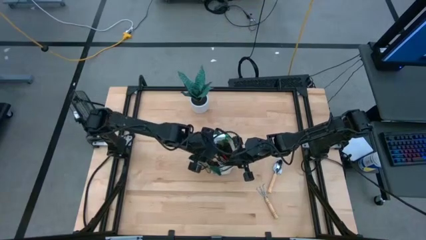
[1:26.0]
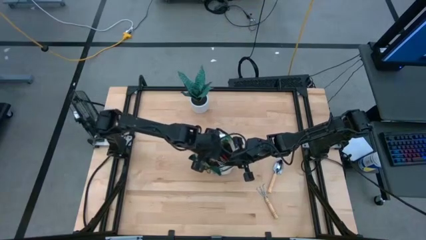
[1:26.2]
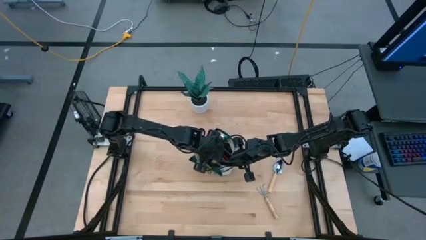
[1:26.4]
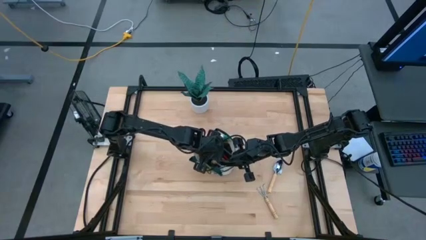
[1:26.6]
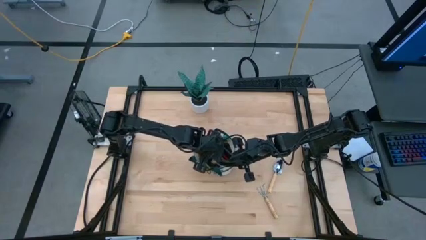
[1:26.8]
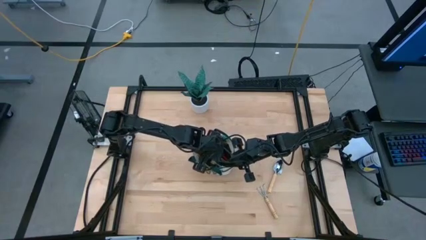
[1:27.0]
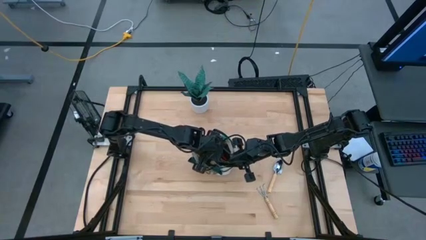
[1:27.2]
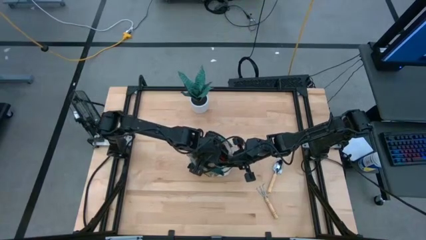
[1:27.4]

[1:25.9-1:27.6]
Task: Pick & Place Garden tools in Gardening bag
Adjust the brown trowel in the gardening bag

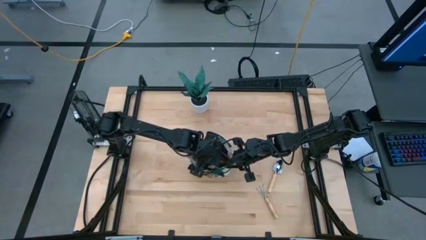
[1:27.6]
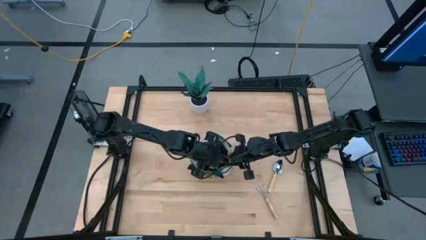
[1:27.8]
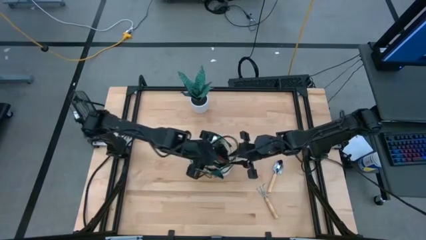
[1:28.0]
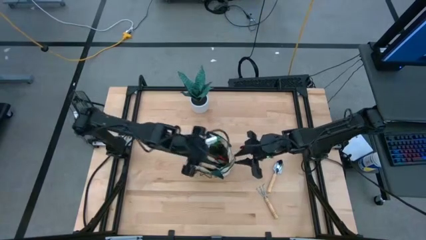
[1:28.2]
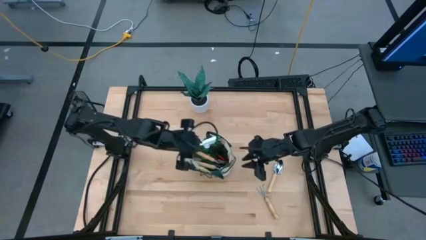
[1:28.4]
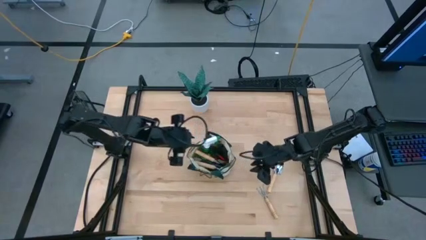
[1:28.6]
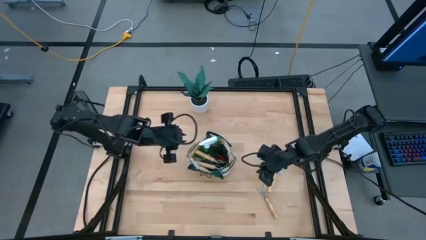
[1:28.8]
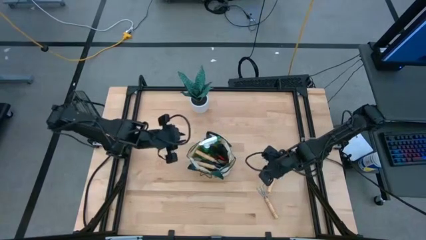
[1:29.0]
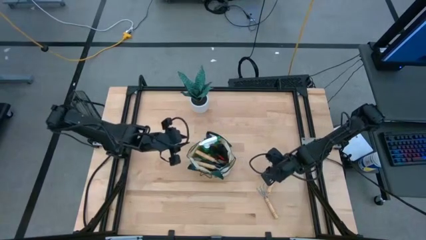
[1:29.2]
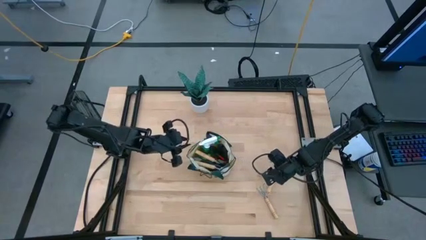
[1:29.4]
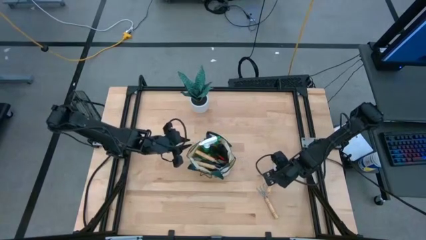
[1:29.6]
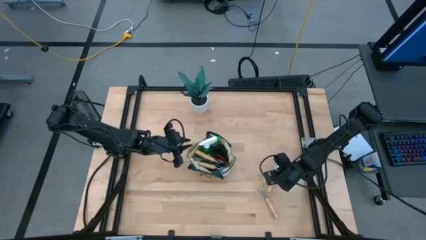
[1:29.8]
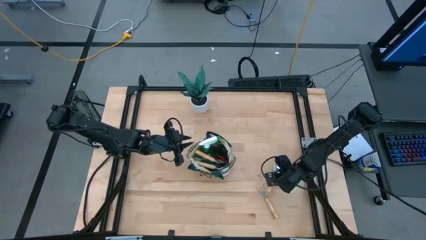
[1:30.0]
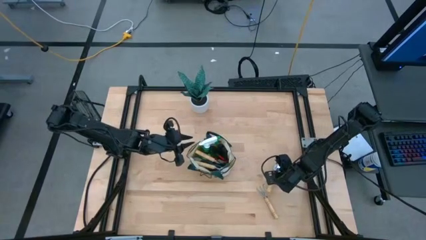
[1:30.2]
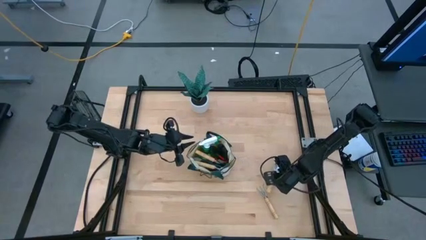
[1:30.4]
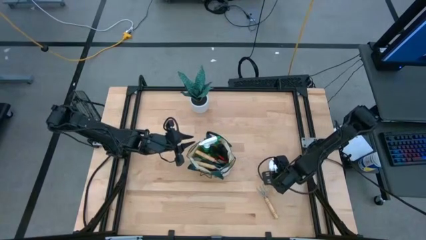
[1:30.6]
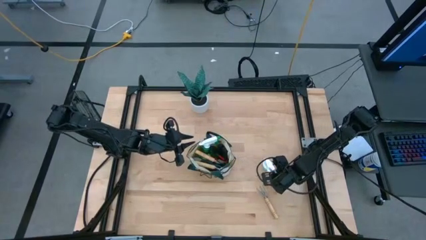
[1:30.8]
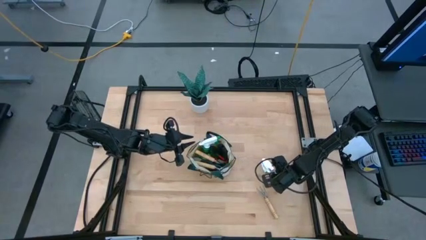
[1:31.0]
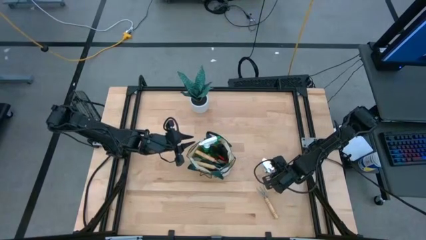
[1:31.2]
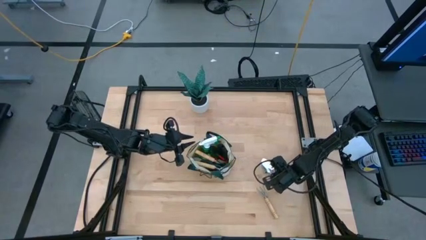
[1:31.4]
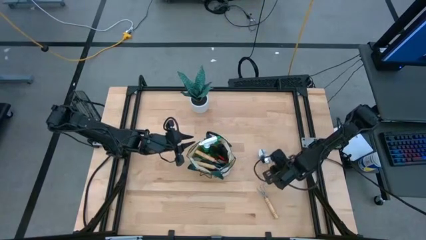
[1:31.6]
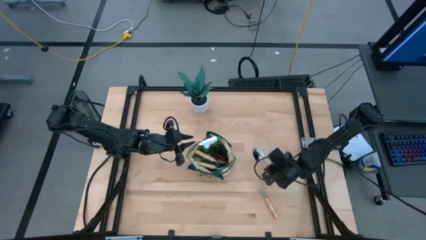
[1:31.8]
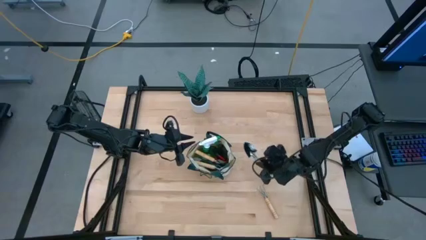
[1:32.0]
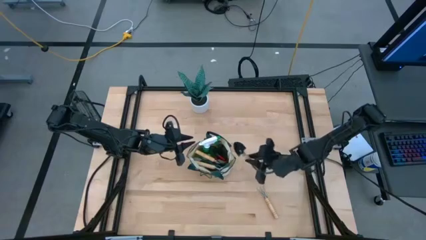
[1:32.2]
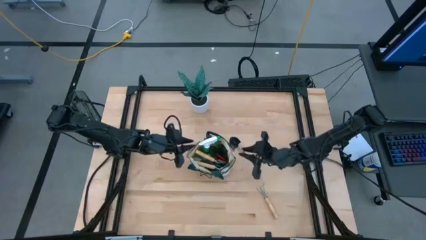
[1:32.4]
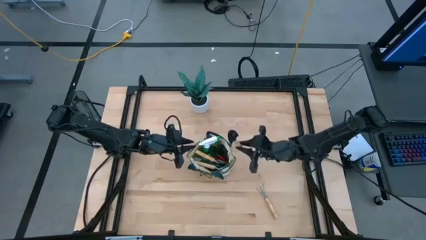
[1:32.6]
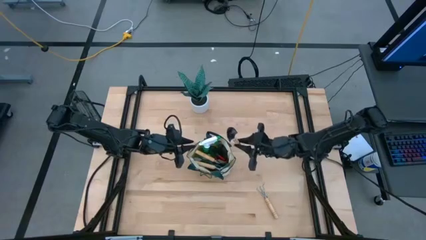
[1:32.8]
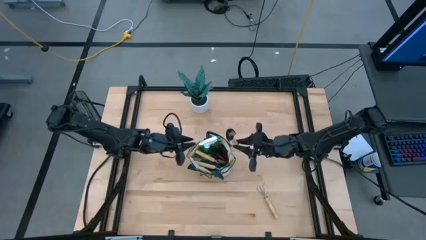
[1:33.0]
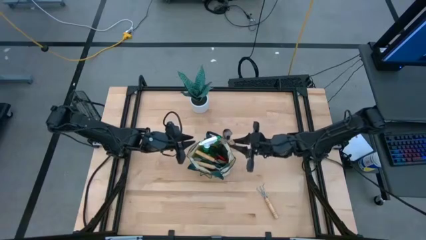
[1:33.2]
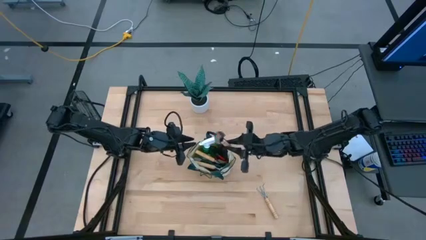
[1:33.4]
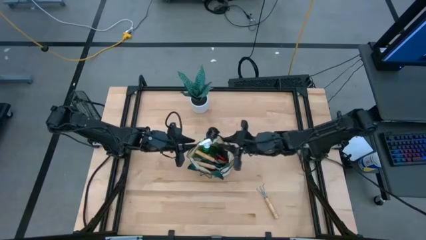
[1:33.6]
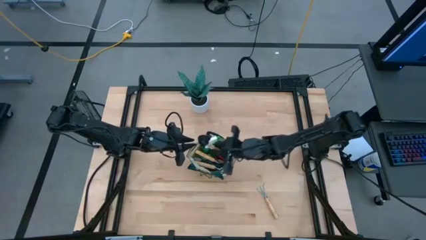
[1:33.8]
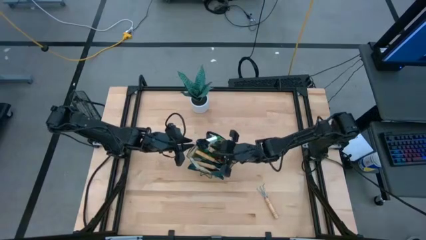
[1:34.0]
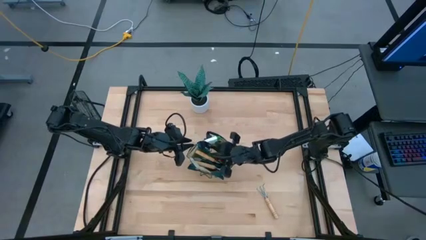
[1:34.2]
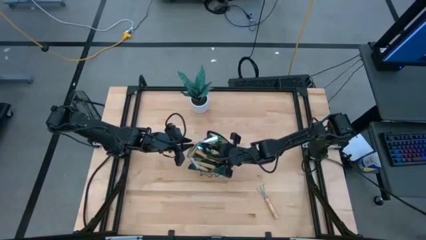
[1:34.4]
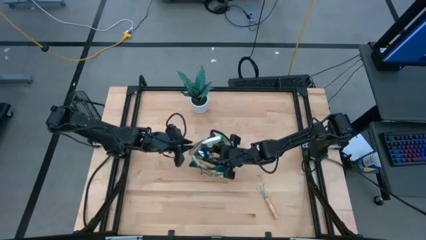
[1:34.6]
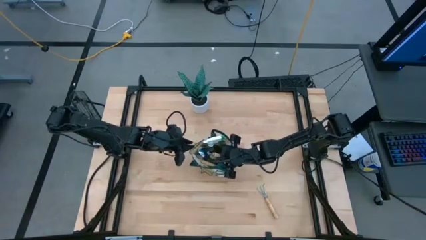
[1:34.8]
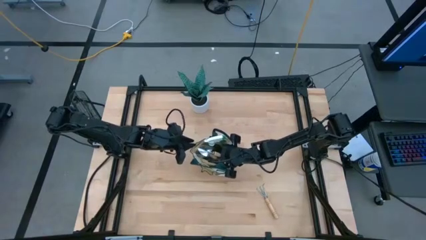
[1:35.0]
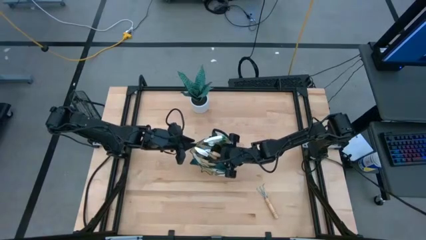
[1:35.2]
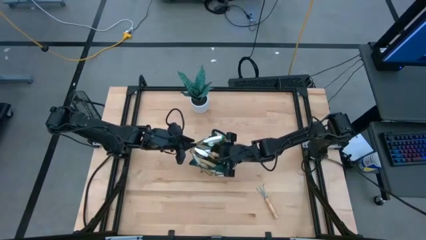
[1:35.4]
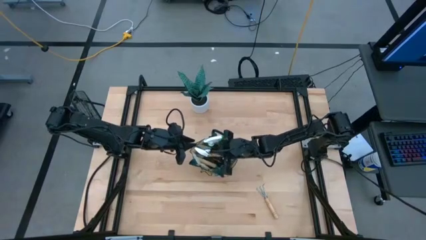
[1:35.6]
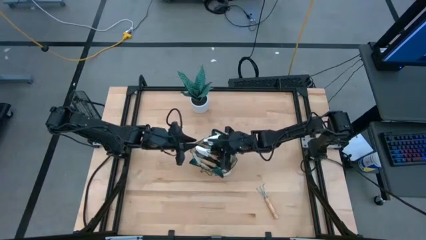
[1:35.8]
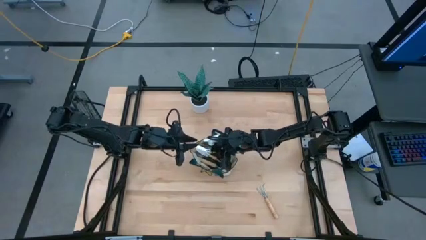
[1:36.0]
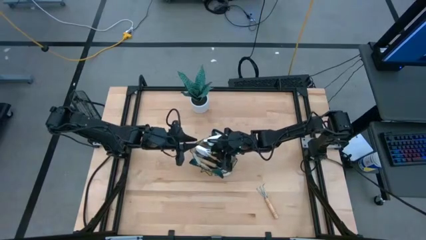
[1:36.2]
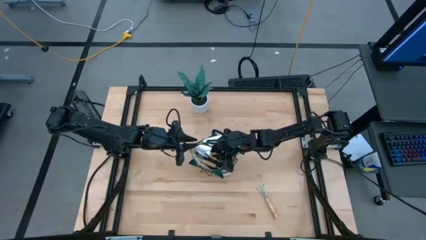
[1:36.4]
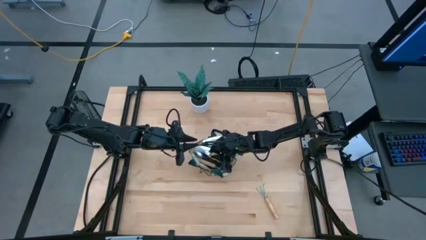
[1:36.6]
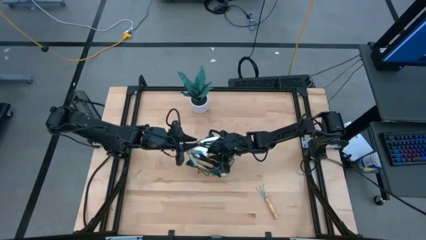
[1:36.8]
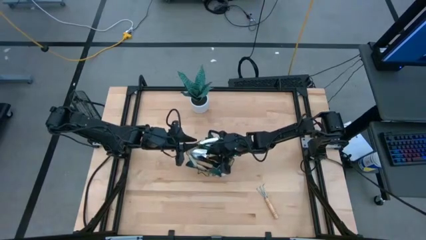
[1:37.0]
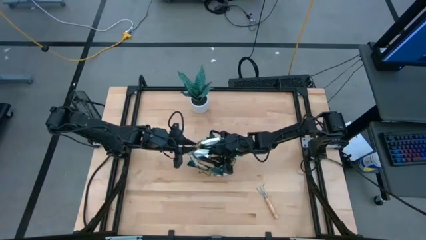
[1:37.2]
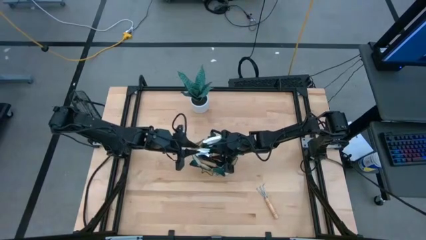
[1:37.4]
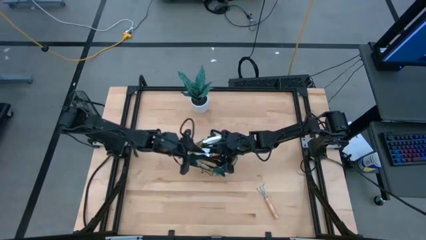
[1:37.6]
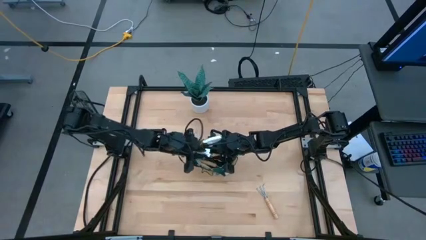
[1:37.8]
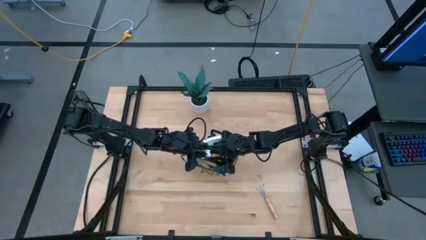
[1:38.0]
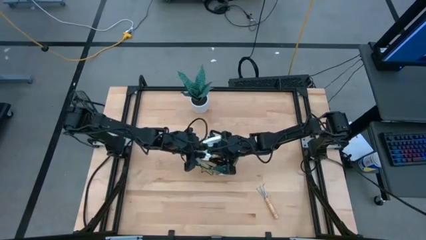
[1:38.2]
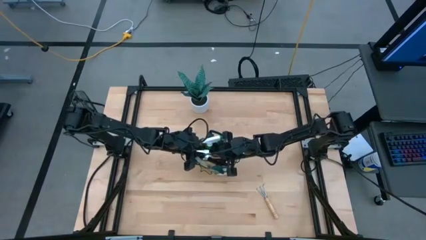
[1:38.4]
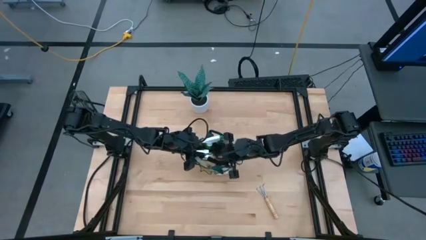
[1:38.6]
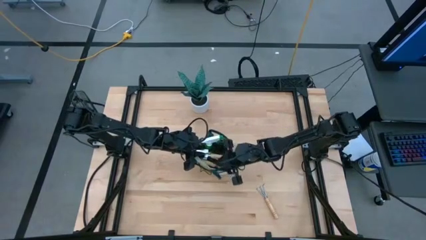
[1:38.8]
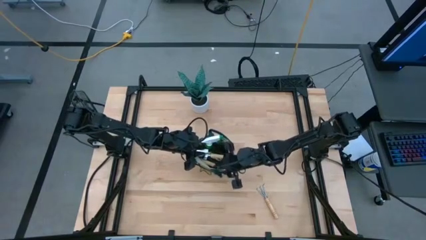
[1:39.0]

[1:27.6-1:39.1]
Put the brown trowel into the gardening bag
